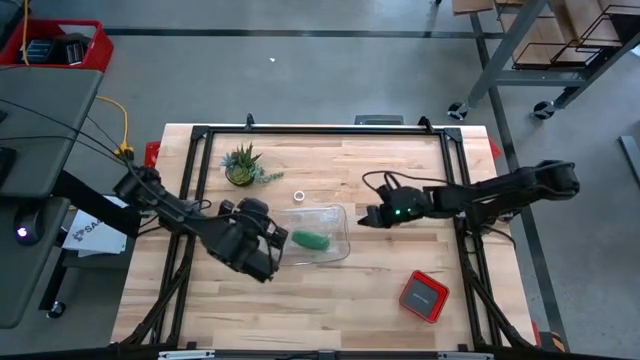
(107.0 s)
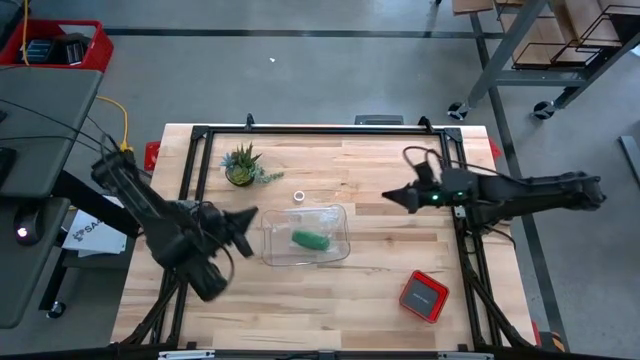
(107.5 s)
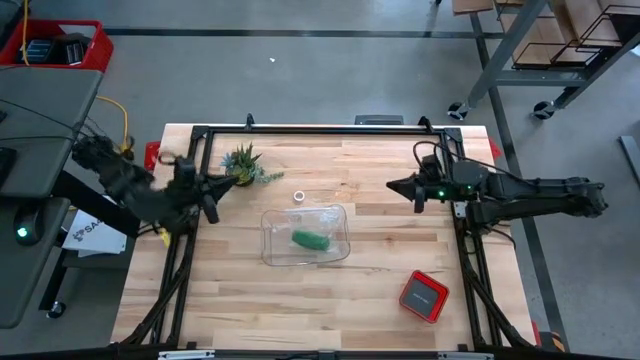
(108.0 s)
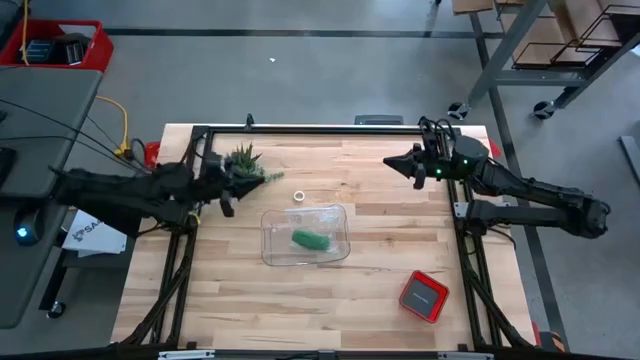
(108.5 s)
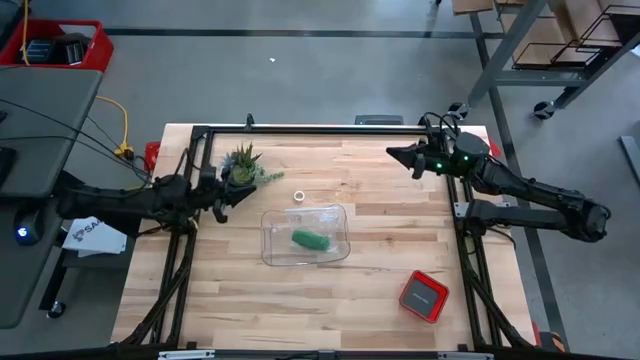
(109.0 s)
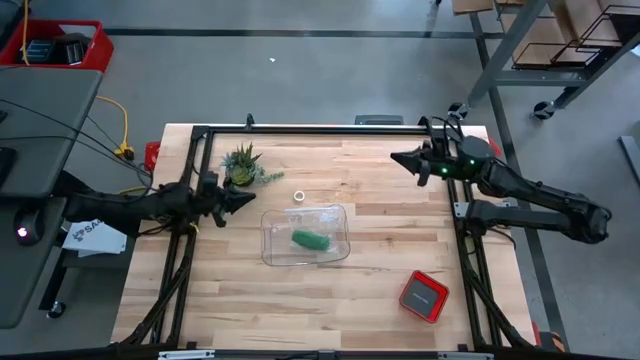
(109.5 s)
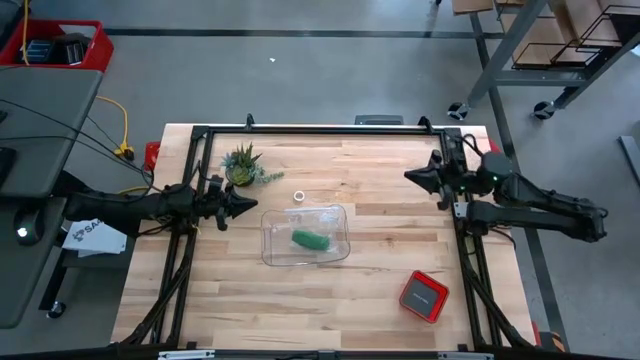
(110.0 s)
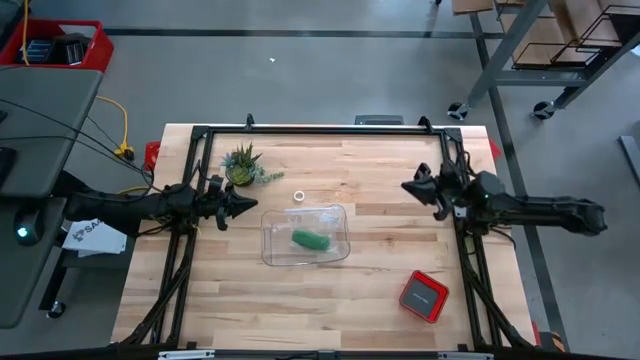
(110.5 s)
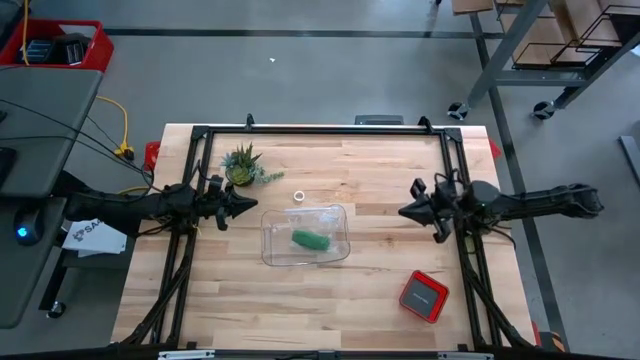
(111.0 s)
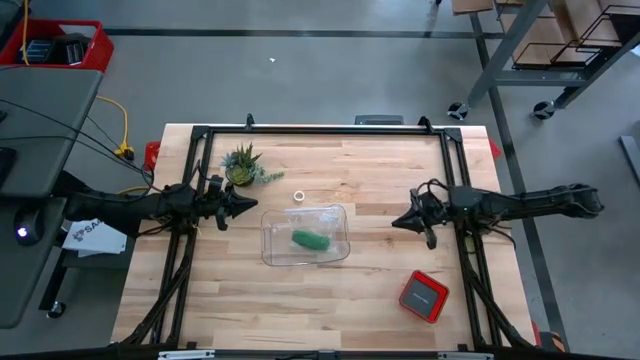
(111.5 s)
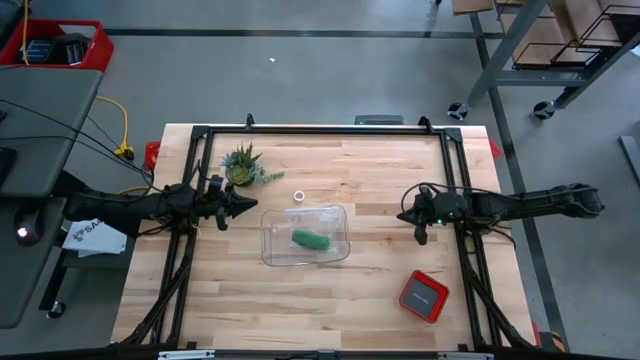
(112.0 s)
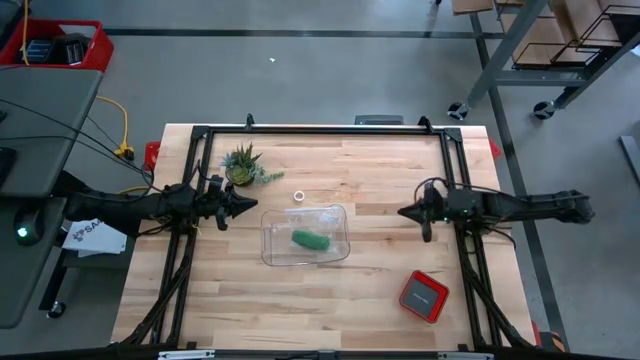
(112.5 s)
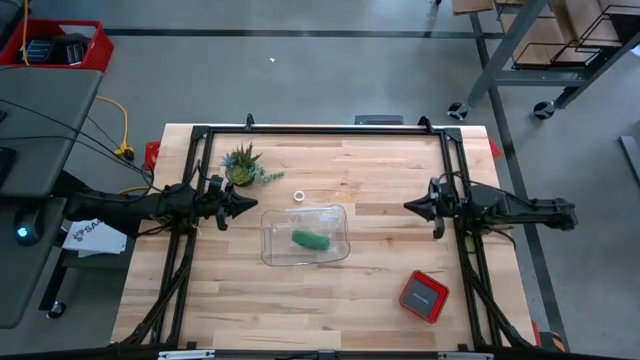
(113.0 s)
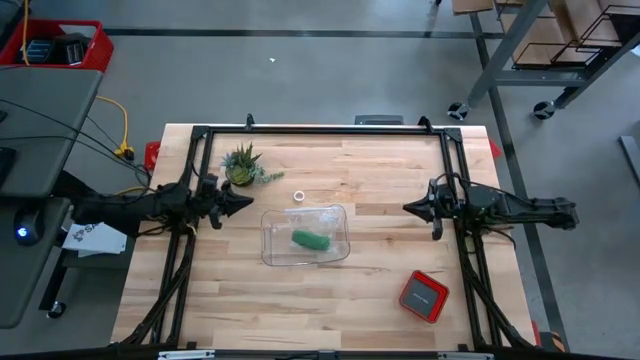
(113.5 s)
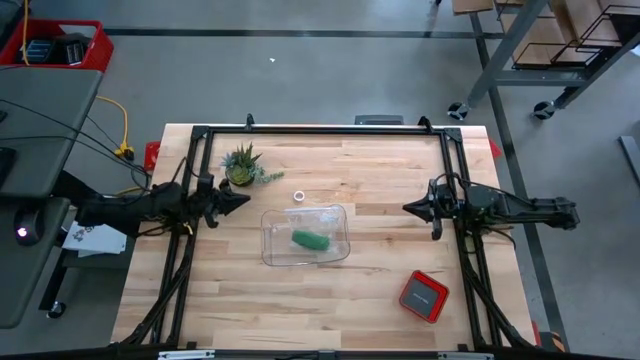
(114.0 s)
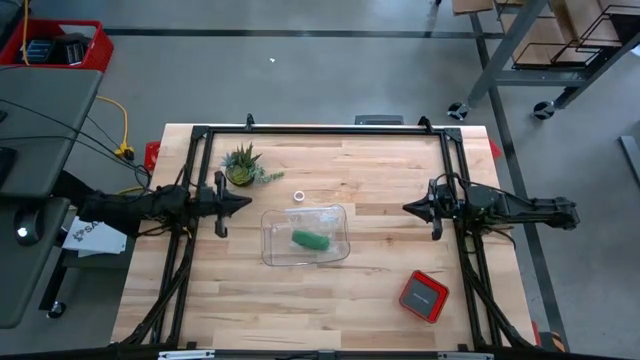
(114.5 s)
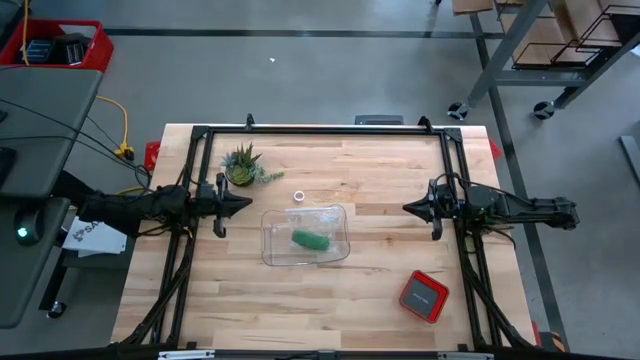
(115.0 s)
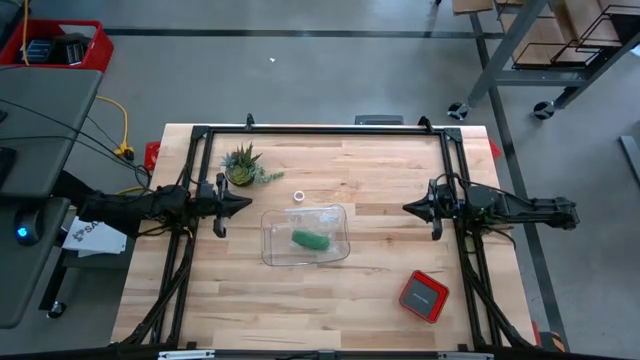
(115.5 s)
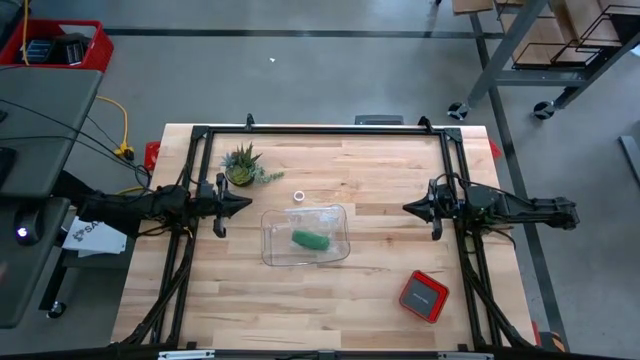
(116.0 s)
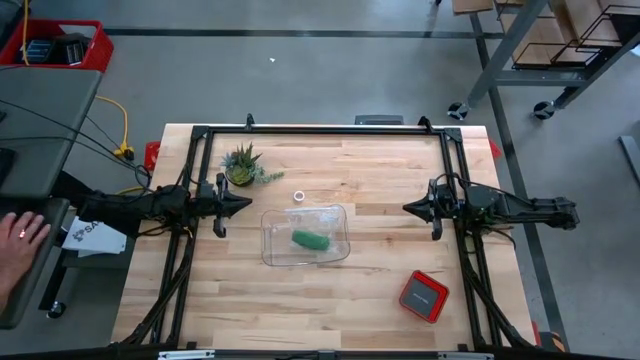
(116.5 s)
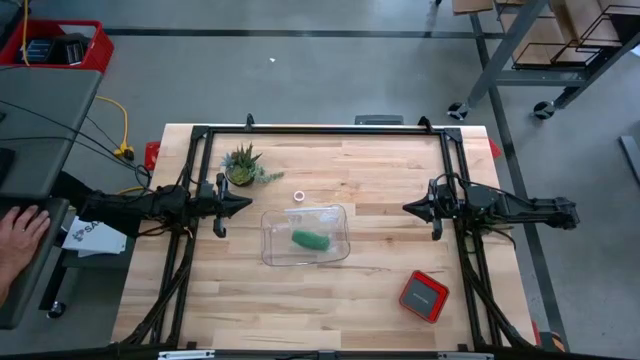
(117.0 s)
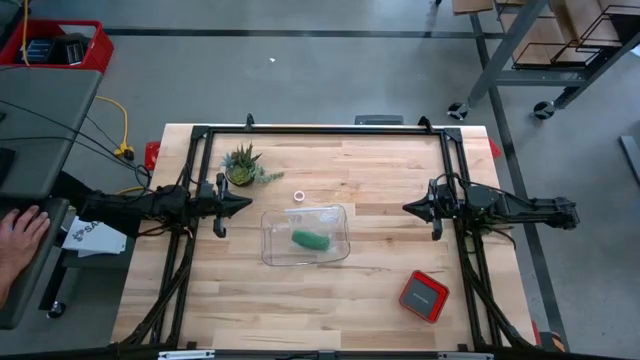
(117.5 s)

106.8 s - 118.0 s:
Task: Roll bandage
Return to Home Position

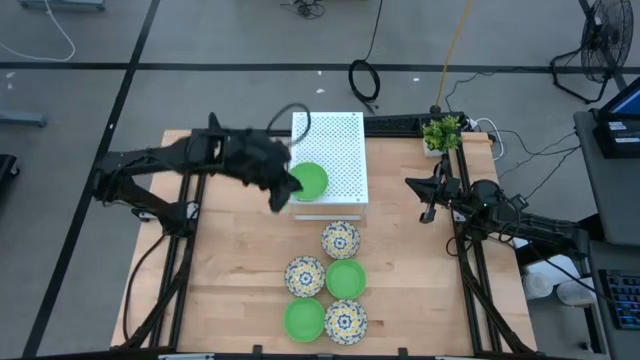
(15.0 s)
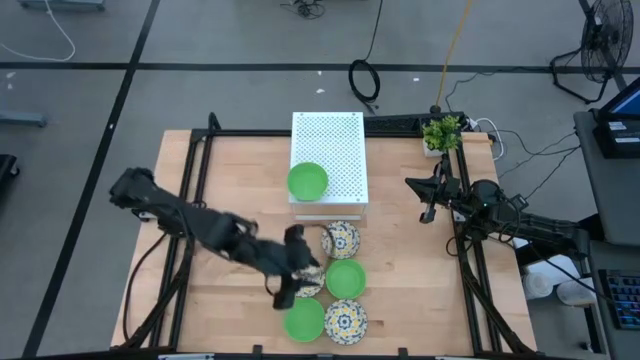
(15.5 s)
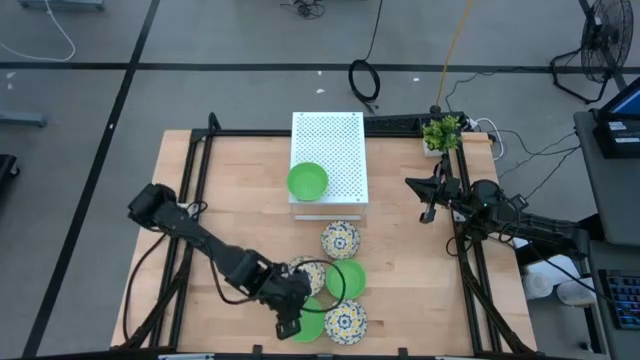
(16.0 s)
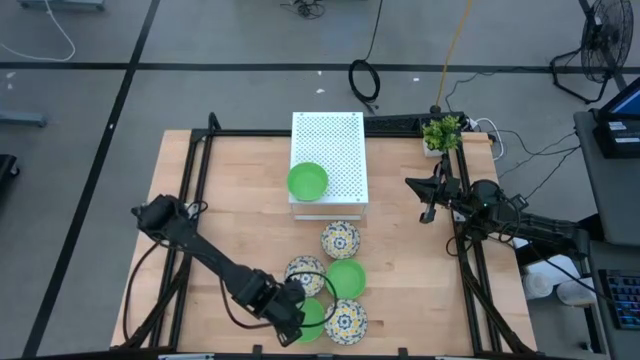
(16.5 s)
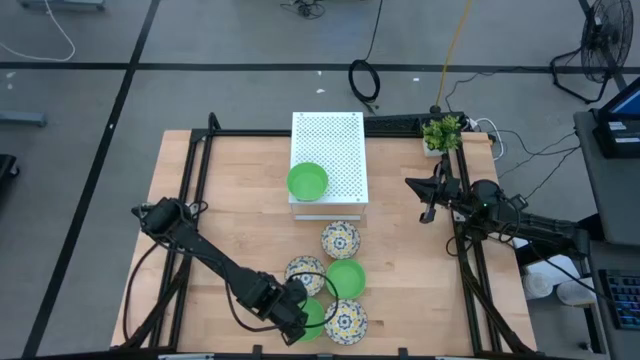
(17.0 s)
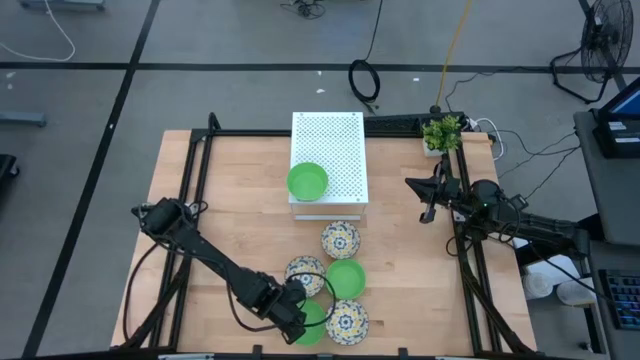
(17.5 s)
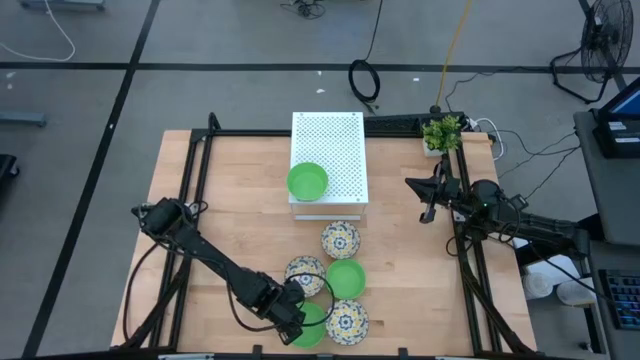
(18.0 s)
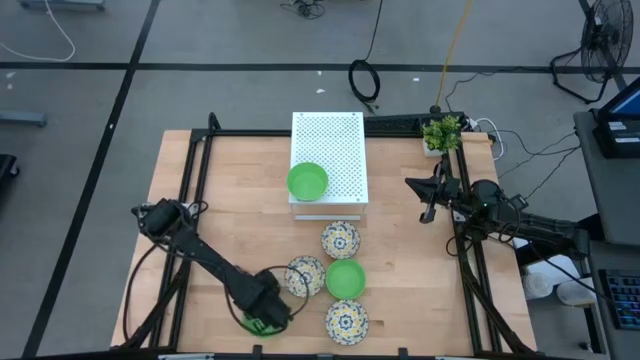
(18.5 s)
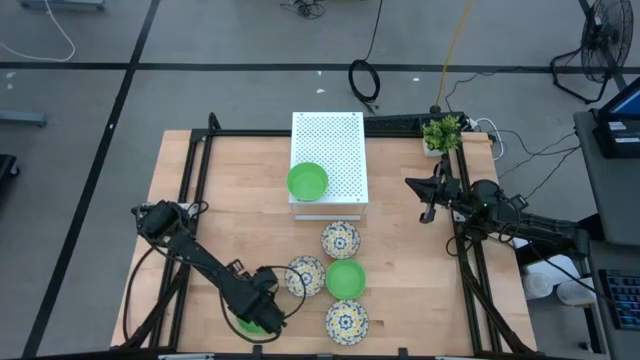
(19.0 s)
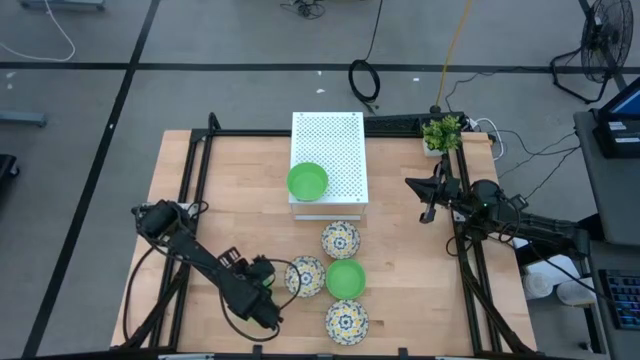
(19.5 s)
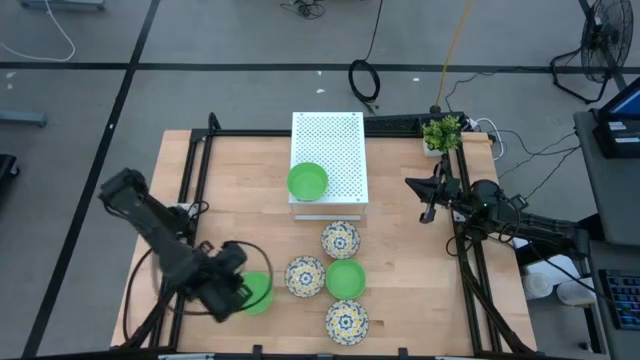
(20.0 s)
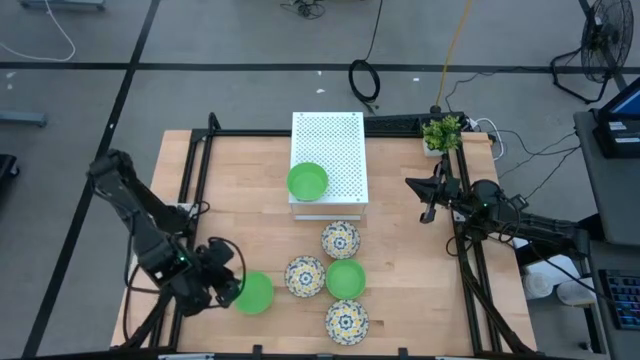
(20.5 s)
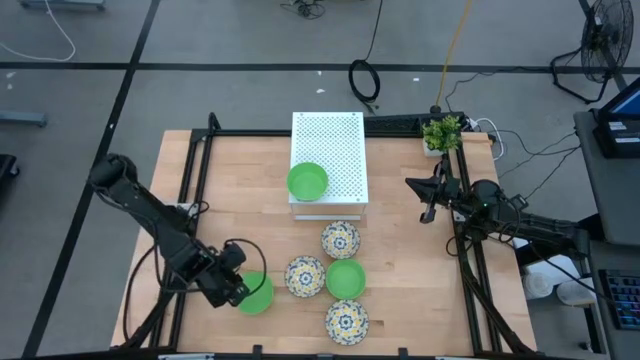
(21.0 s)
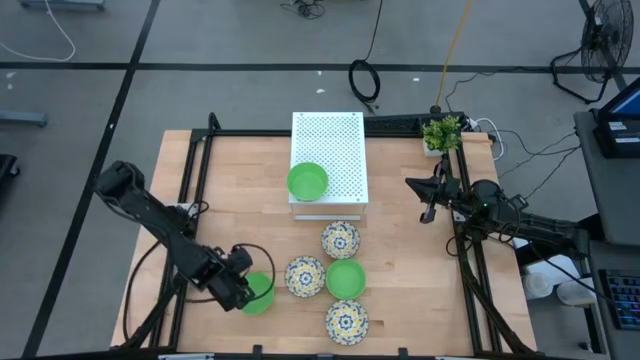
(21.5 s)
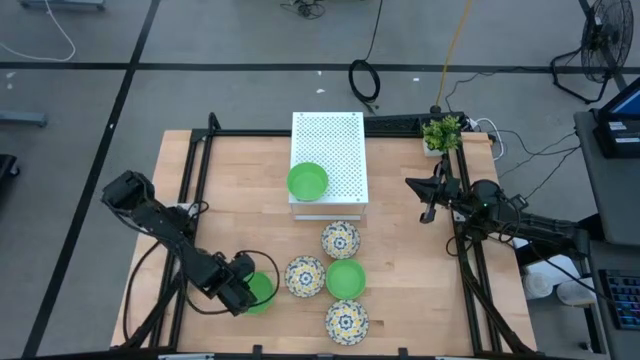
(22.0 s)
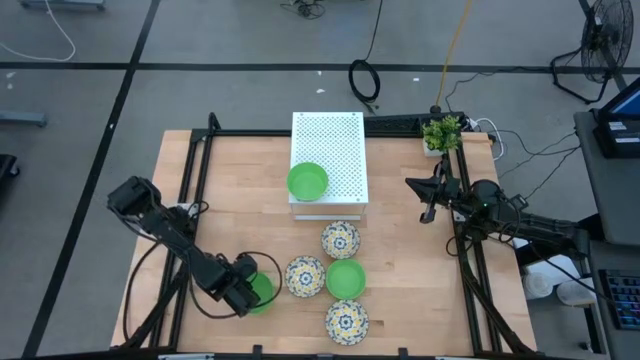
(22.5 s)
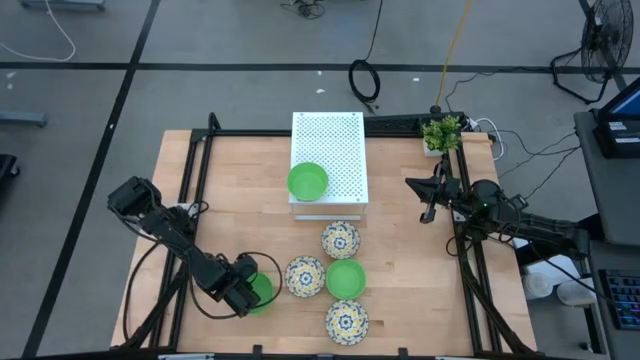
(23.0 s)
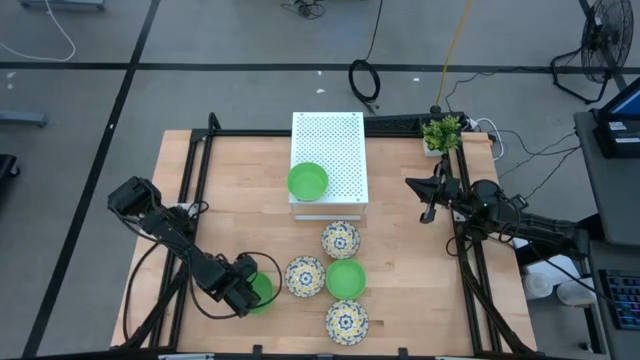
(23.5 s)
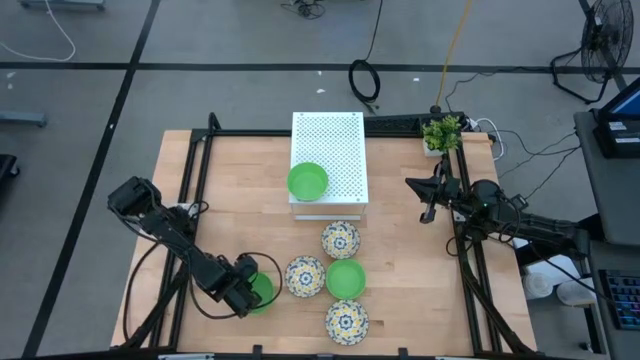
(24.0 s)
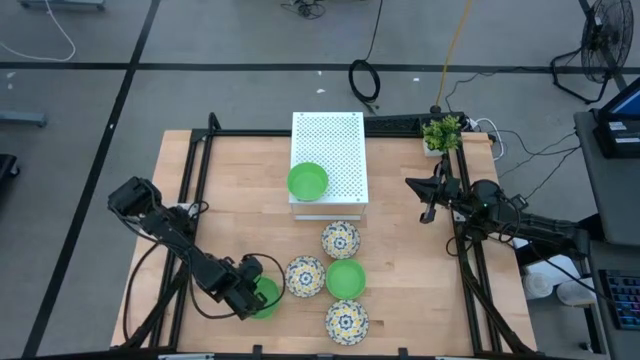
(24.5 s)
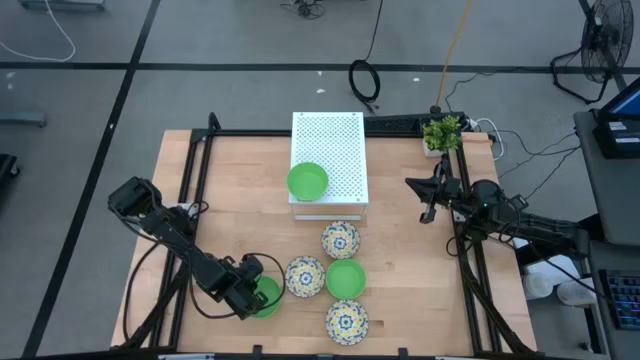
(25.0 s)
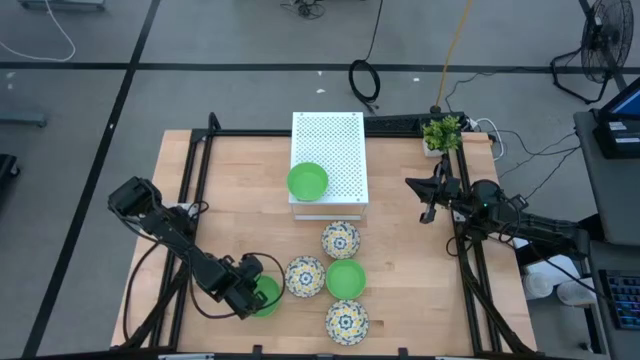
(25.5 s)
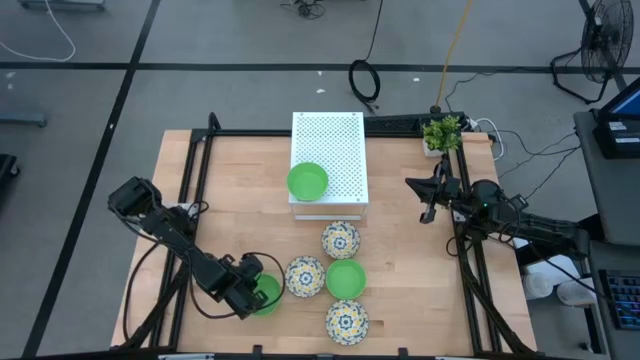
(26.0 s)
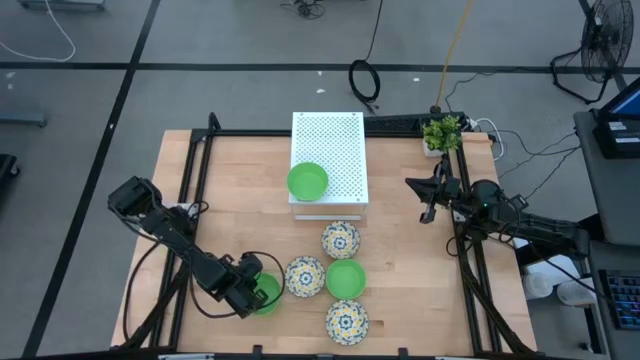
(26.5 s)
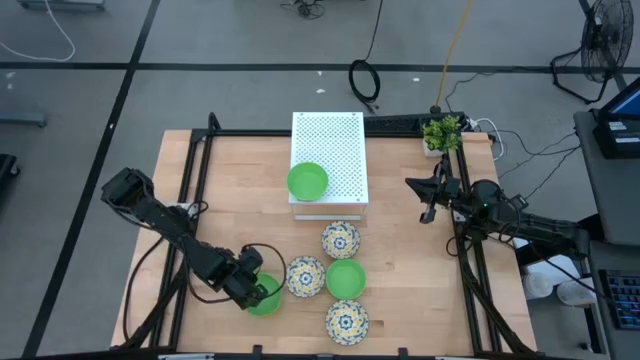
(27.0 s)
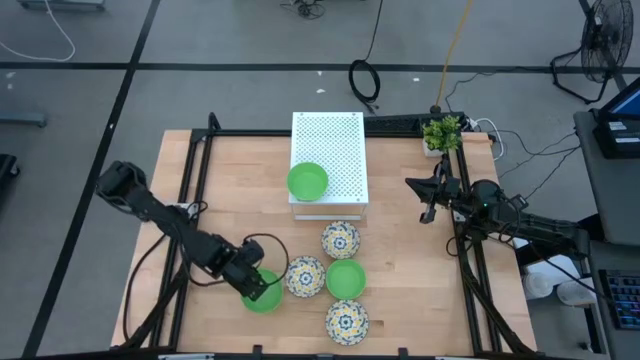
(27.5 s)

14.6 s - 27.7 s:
Task: Pick & Place Mini bowls
Stack the bottom green bowl on the shelf
